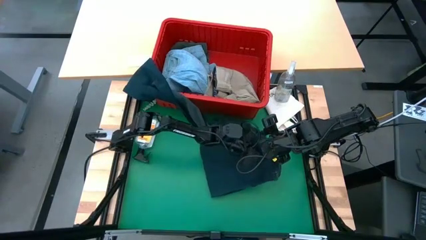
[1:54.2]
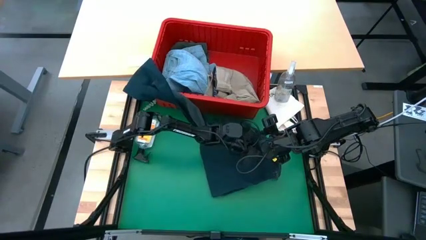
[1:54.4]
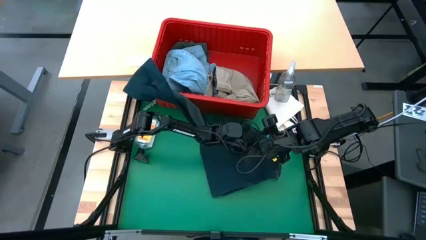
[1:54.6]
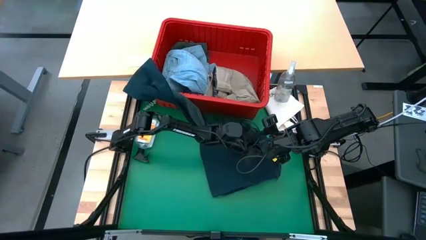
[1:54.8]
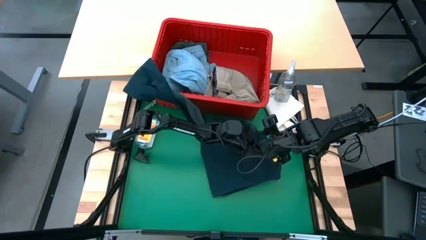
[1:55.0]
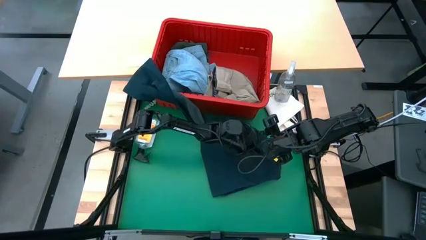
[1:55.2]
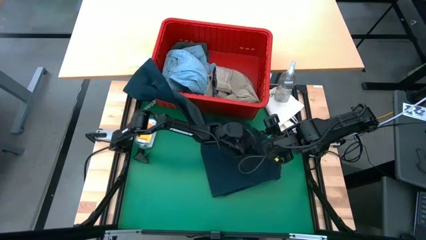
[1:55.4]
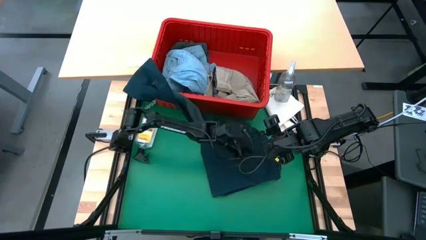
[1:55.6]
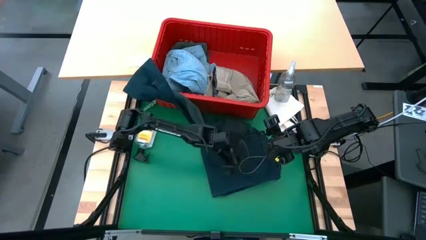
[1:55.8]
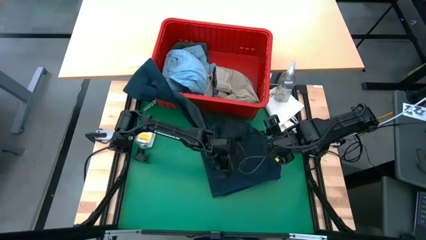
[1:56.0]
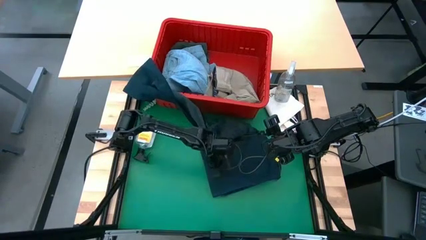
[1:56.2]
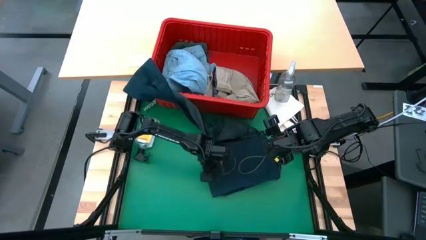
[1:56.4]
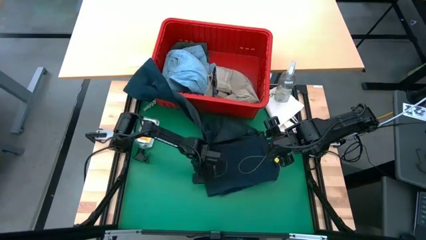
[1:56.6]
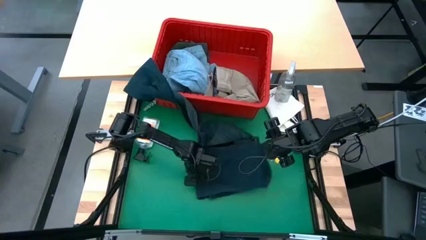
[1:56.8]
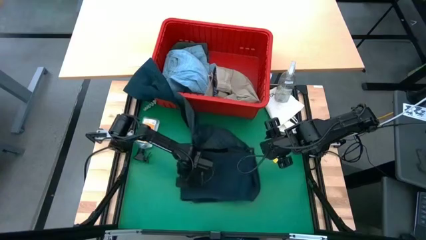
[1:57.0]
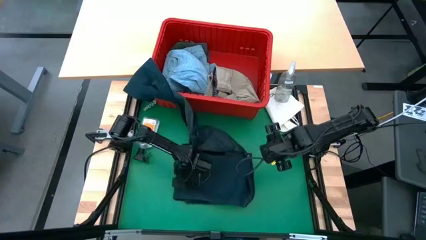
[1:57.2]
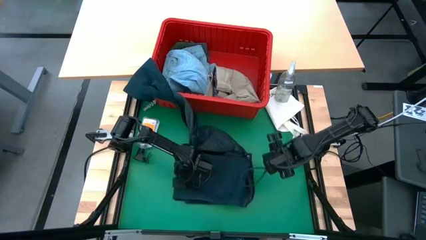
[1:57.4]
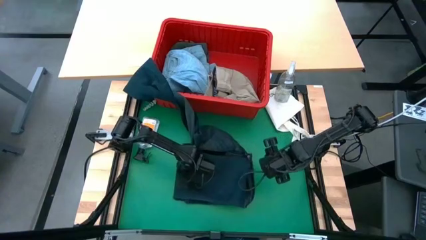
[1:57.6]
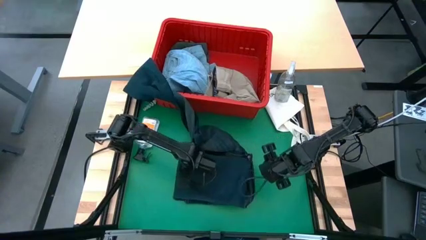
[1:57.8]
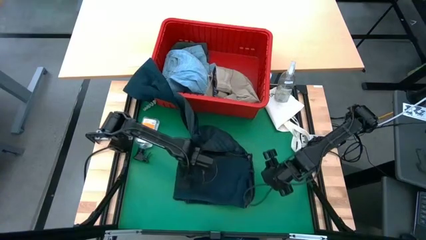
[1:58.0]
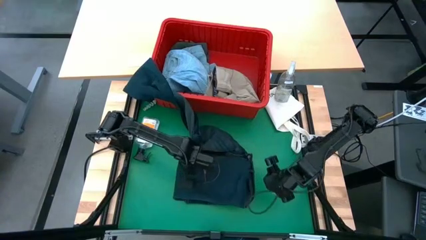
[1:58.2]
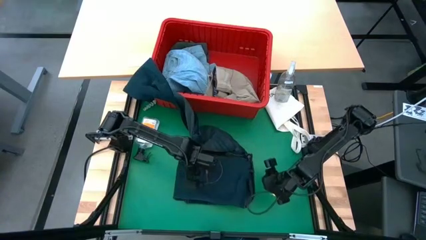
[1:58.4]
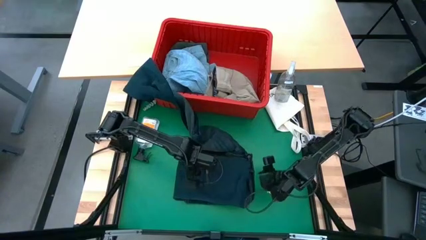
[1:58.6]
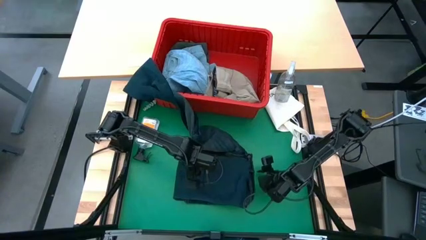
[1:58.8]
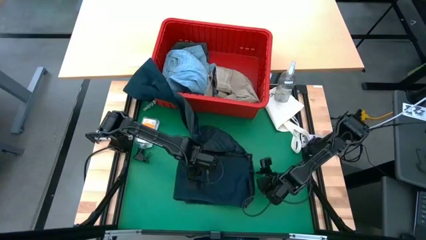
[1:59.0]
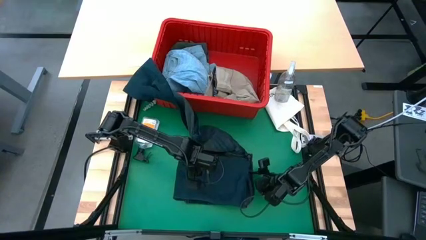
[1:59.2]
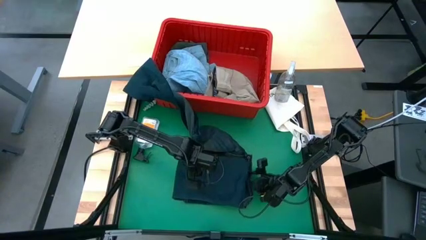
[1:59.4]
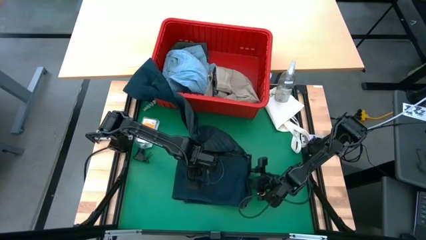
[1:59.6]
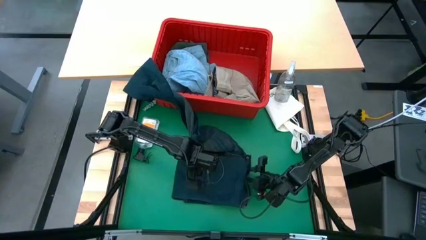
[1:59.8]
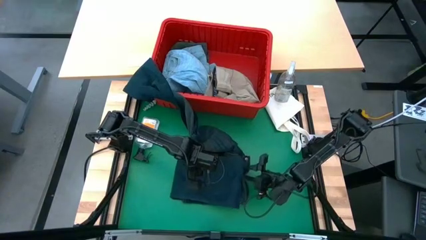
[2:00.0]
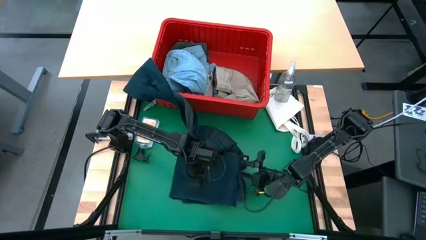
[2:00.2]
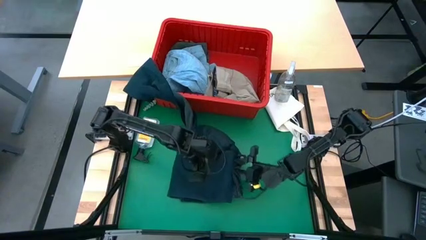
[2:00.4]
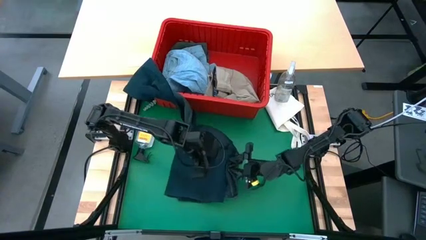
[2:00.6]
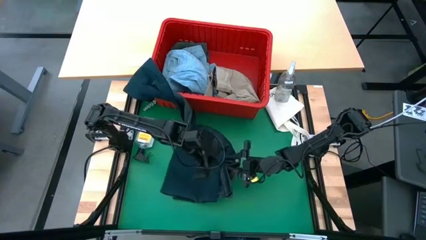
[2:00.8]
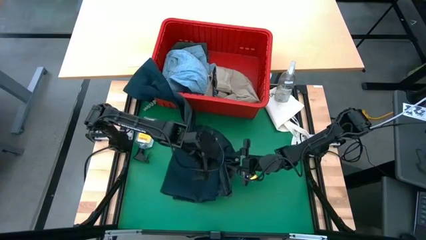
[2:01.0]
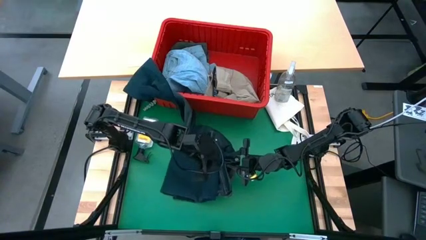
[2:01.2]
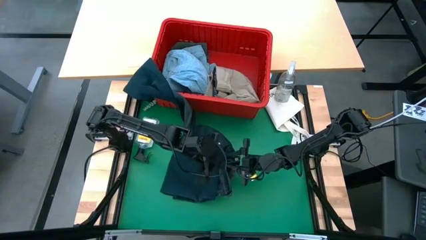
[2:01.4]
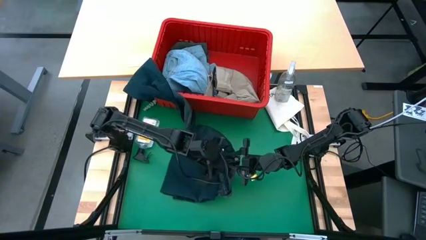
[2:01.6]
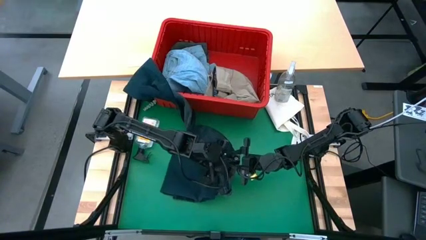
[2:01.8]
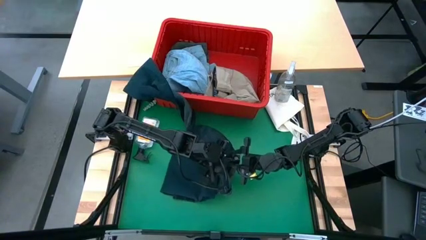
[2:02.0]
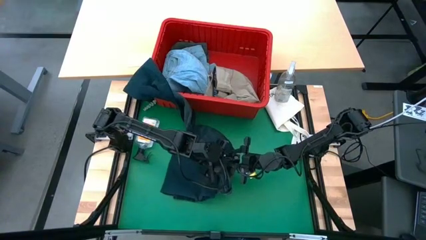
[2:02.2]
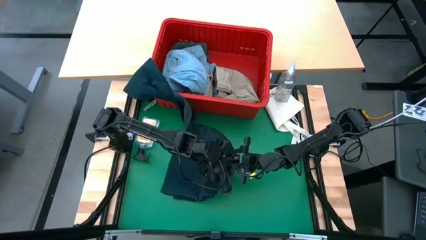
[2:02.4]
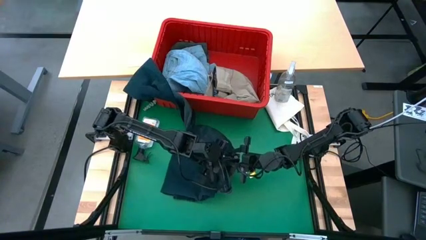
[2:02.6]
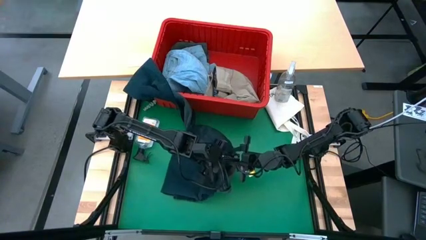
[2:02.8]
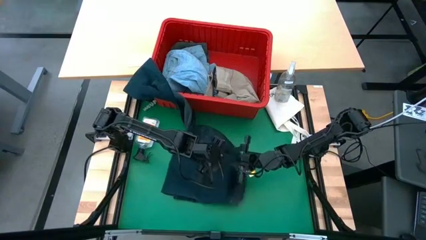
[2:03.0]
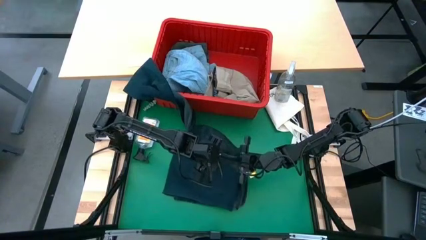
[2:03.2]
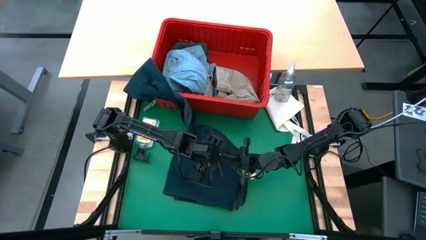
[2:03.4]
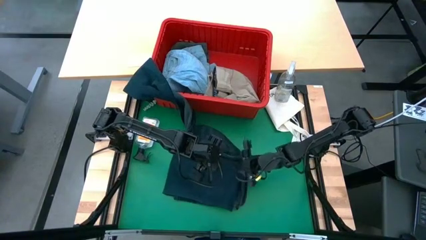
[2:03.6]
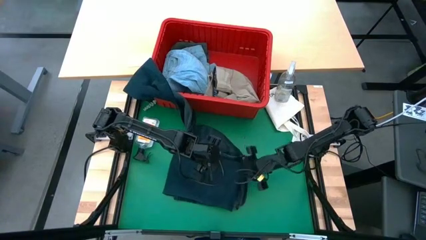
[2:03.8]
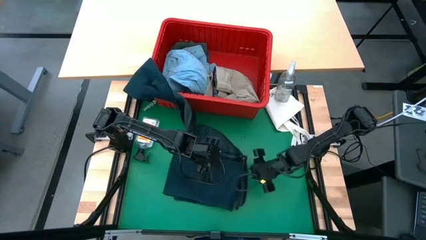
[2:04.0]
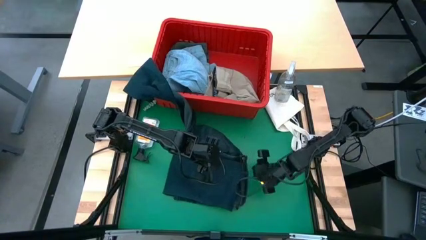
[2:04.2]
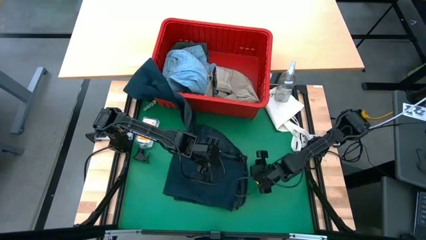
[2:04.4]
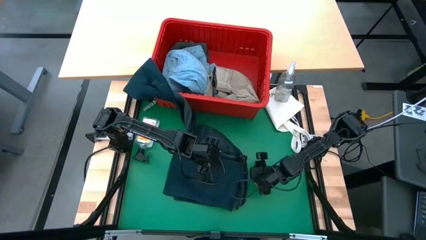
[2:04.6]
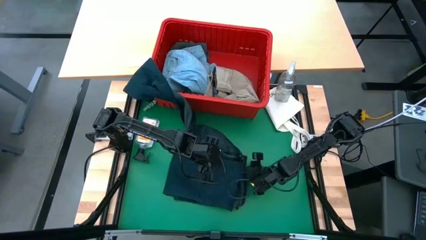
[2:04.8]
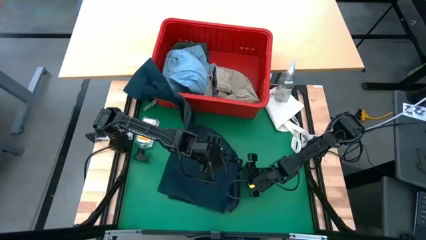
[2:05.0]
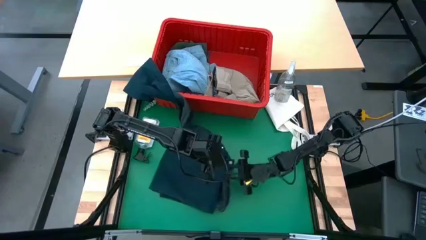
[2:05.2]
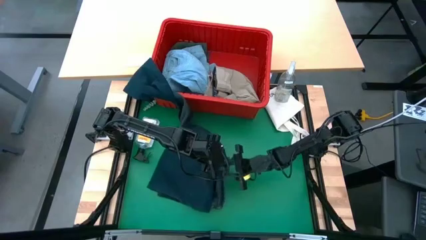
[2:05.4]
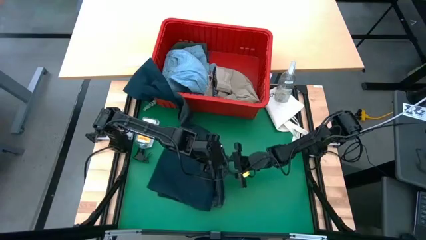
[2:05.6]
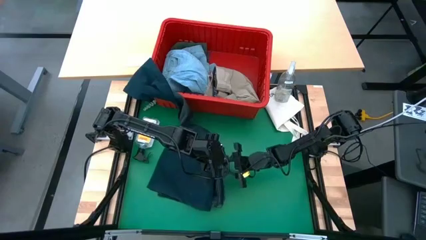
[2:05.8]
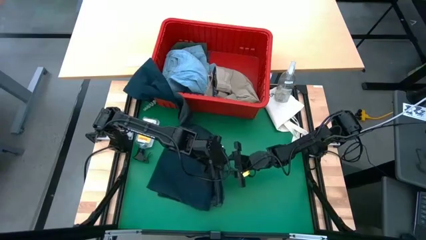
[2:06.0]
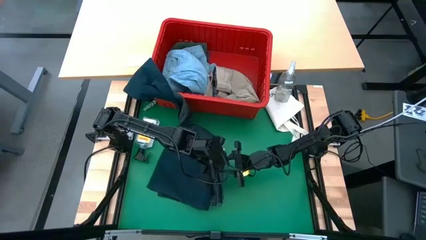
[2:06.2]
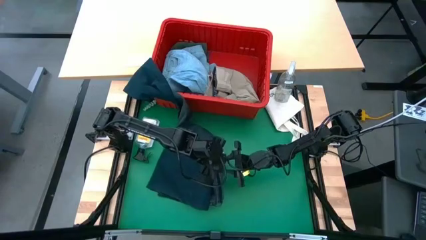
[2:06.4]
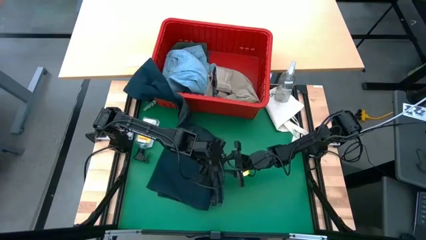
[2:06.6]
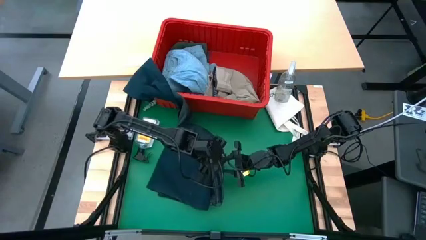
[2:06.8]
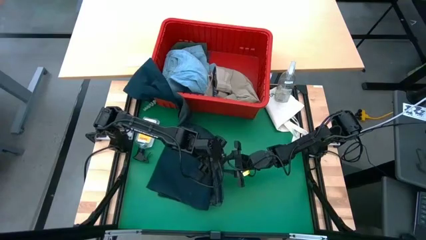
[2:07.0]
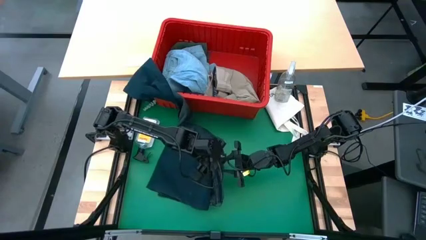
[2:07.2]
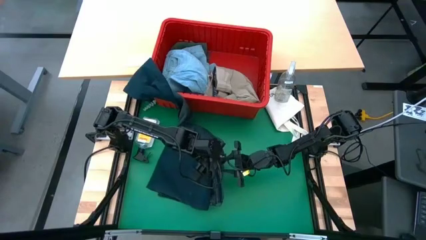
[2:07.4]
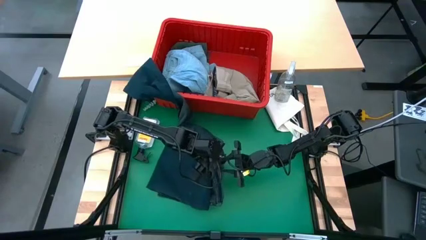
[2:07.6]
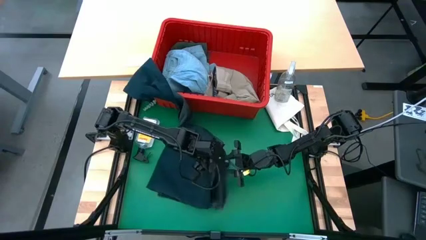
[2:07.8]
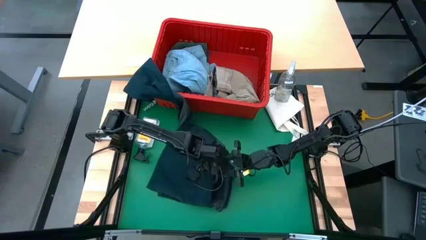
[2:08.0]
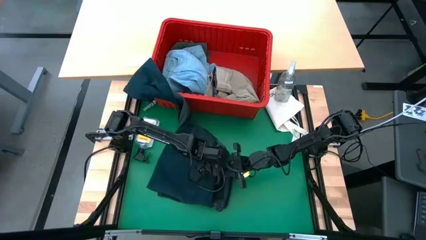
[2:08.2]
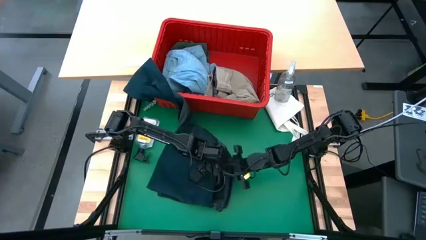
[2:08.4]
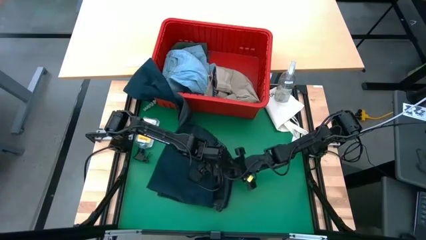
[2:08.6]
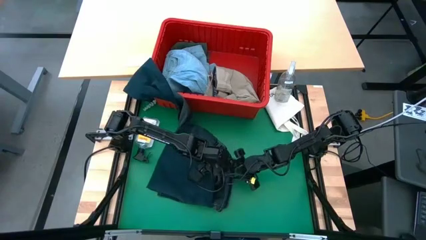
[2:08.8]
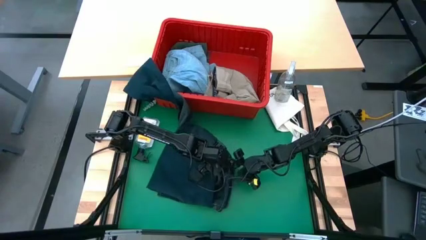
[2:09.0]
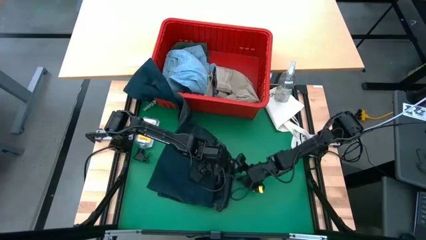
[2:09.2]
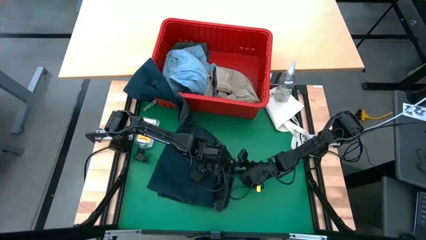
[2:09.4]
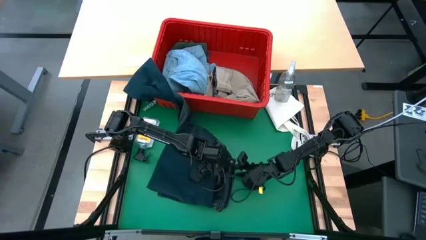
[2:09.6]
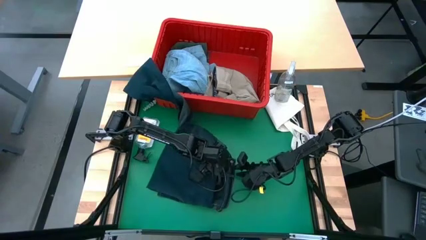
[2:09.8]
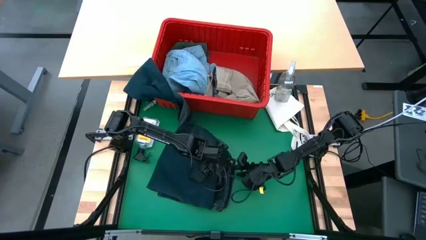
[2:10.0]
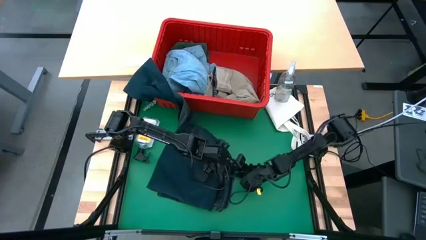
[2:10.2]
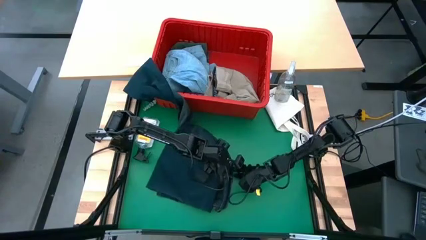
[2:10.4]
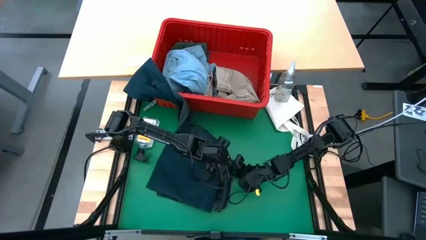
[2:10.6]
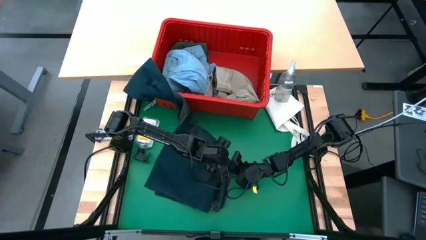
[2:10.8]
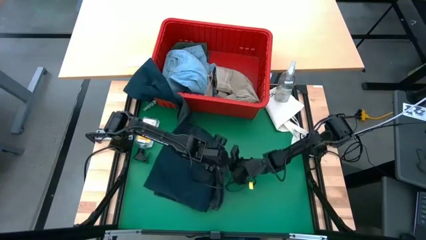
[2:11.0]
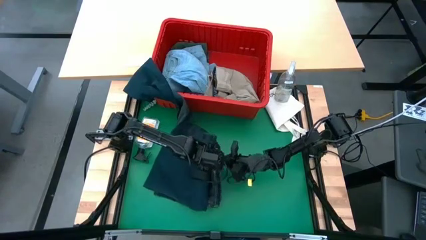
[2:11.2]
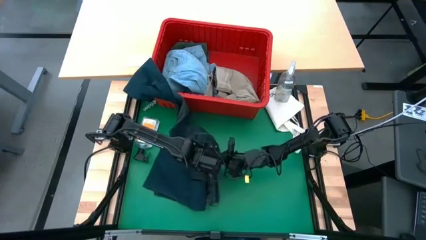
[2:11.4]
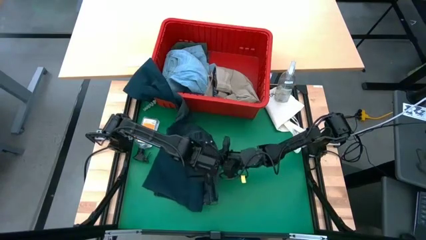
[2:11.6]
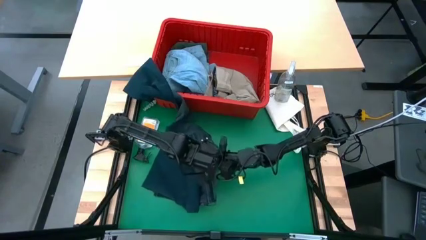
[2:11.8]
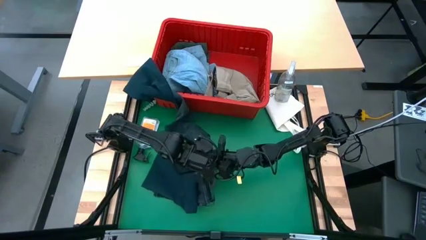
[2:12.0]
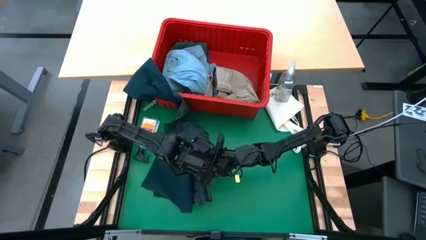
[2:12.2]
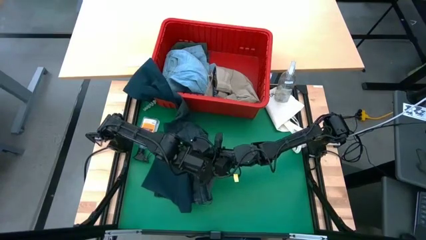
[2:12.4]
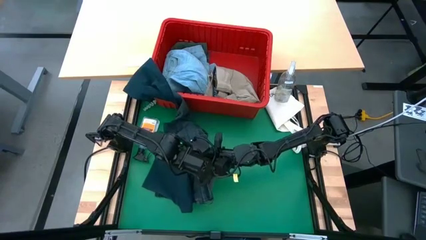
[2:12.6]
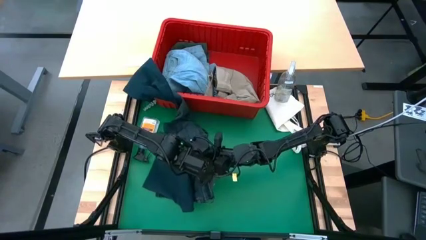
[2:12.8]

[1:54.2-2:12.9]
Task: Fold laundry
Fold the dark blue jeans
